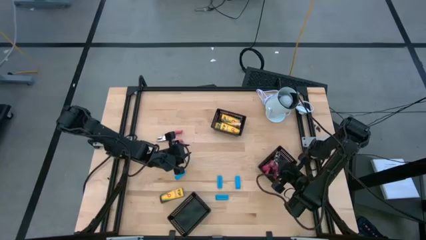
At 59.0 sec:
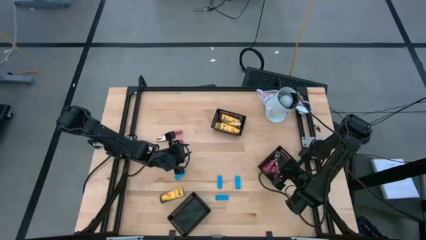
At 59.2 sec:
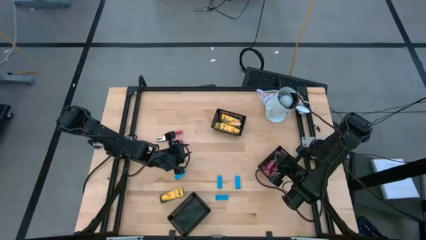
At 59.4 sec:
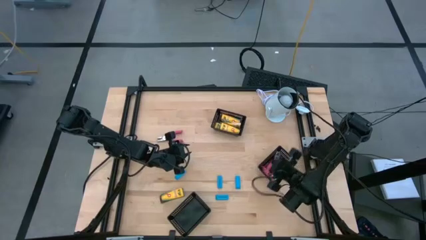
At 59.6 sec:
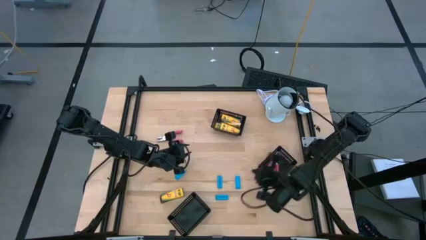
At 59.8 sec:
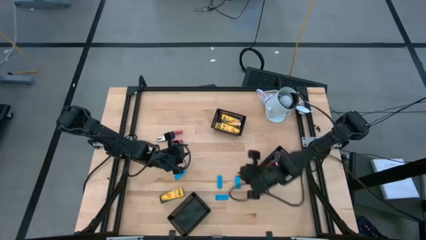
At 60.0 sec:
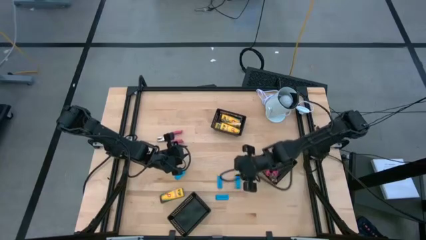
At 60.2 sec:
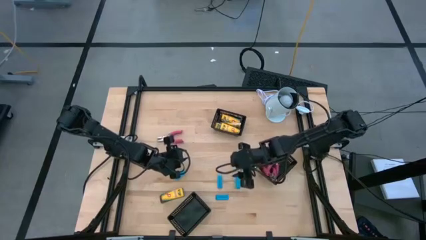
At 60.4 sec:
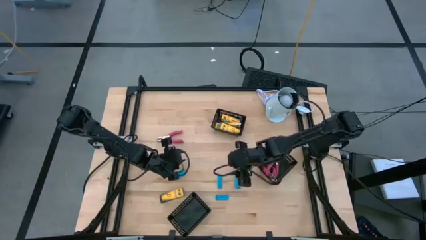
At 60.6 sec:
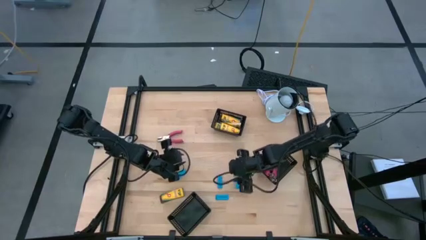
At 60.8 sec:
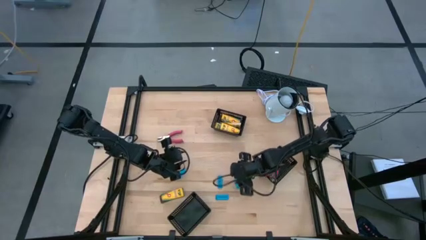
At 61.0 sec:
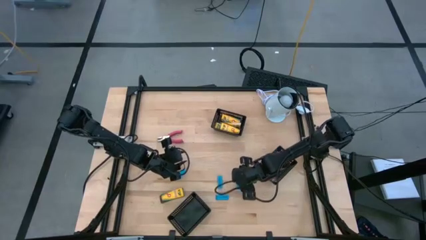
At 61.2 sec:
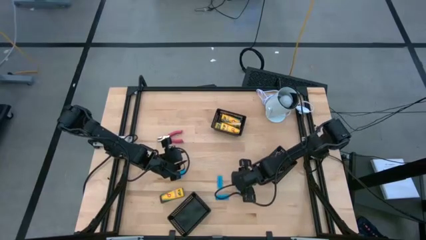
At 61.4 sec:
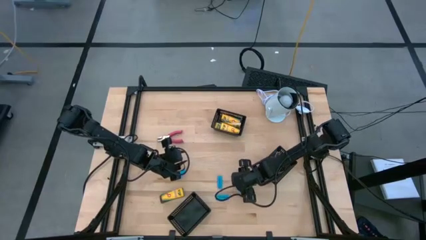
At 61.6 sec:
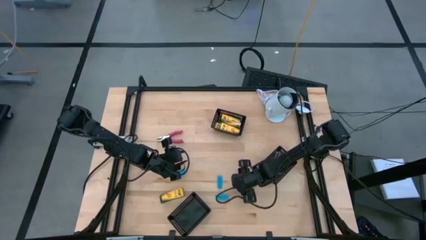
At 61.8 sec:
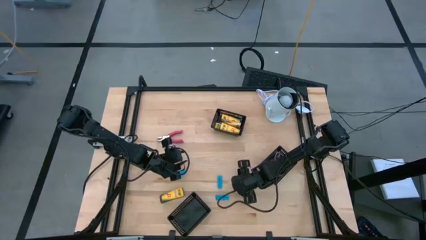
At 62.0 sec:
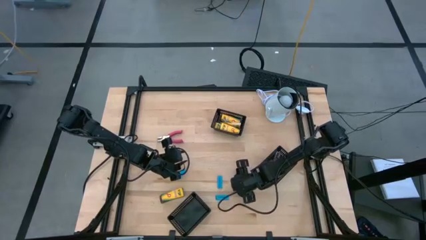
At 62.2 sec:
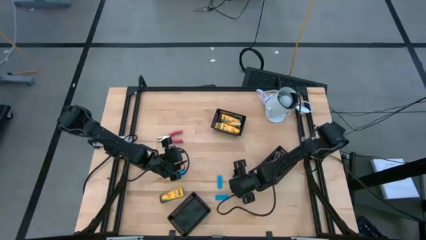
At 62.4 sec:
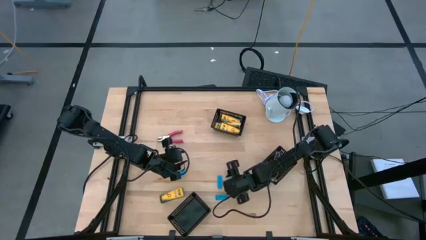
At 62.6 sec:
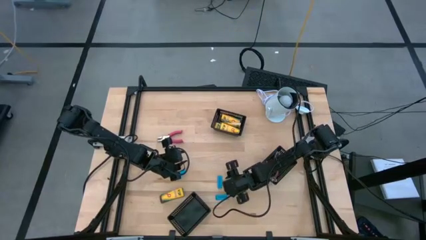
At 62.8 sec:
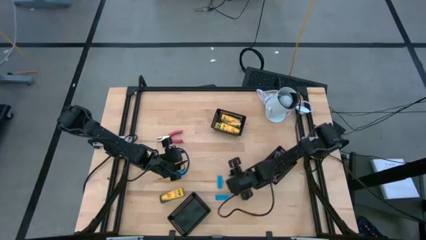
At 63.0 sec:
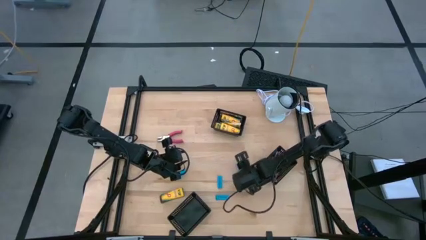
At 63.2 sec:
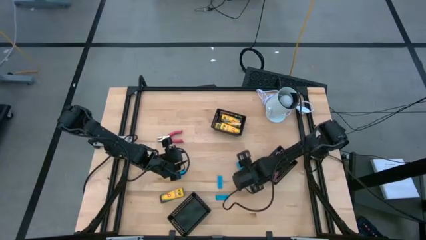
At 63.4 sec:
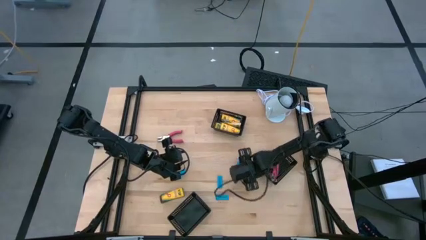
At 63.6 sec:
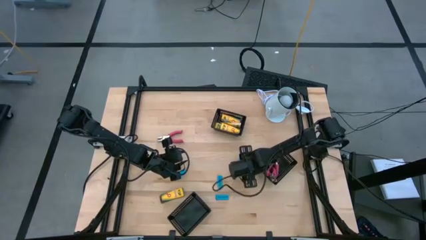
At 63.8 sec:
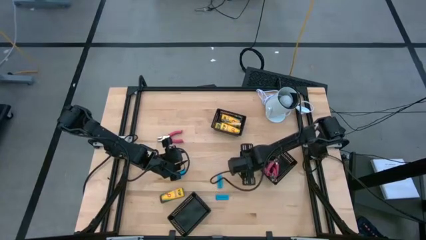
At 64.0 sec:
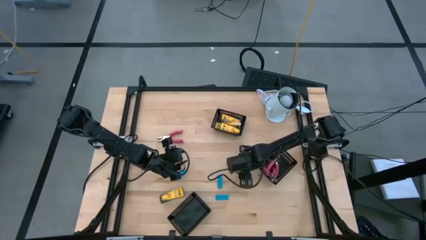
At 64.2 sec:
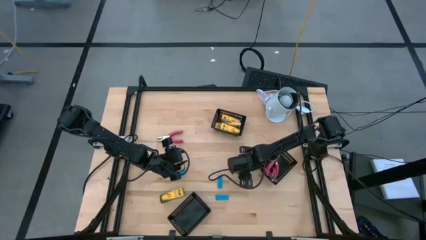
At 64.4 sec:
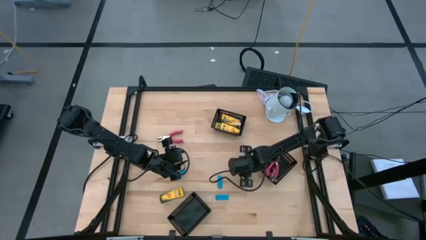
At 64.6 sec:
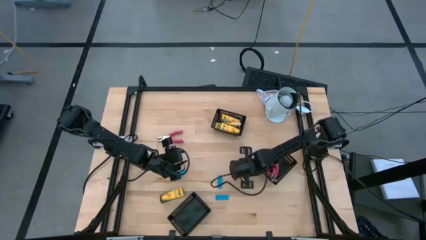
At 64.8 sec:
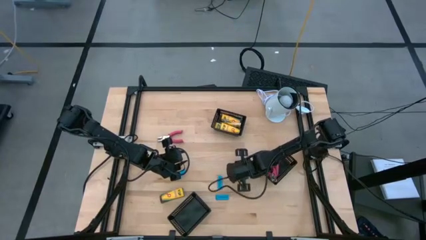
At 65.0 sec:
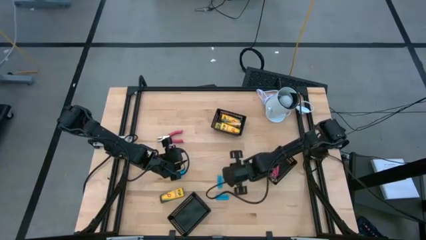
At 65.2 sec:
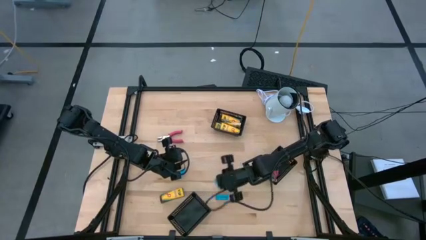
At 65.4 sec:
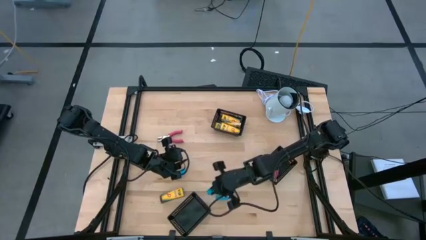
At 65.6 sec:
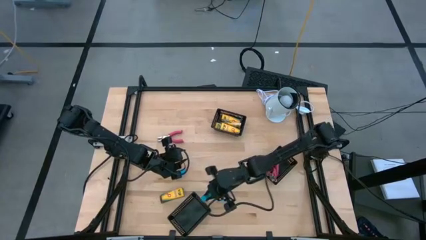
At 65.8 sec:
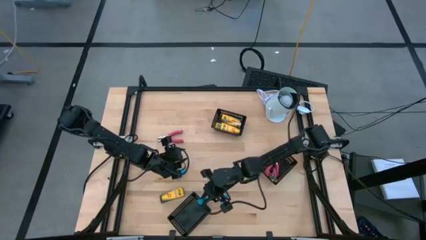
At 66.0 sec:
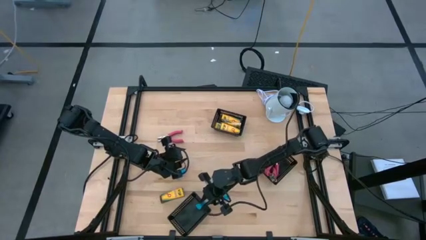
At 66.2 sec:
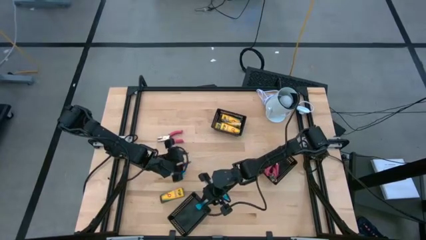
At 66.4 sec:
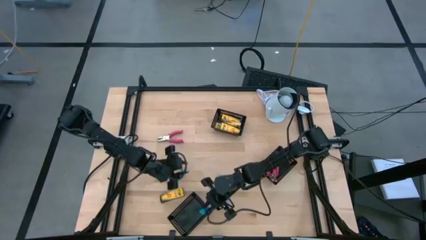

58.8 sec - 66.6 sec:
Task: Pick & Place School Supplies
Put the blue eraser into the bottom black bin

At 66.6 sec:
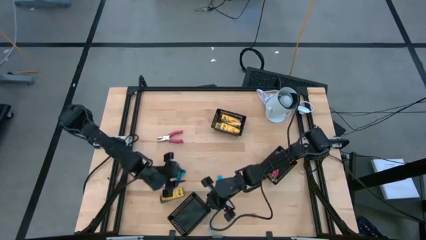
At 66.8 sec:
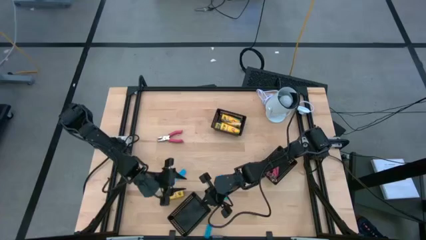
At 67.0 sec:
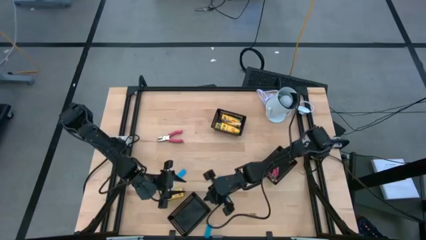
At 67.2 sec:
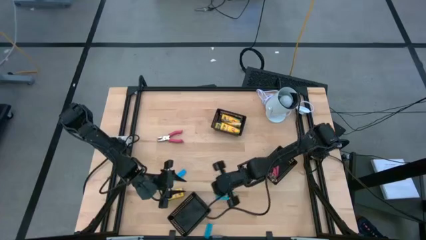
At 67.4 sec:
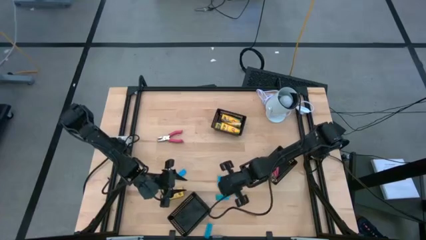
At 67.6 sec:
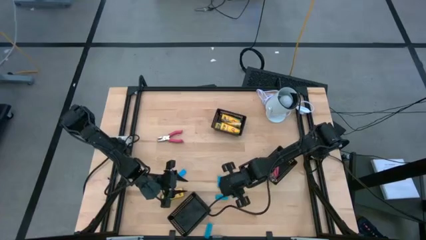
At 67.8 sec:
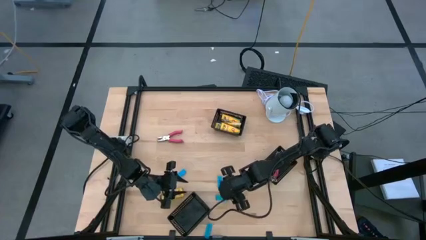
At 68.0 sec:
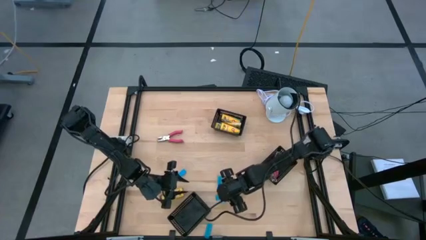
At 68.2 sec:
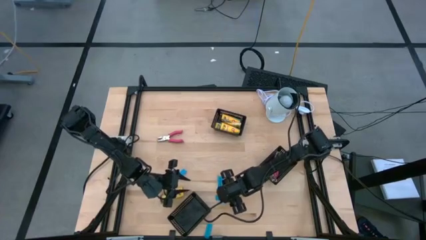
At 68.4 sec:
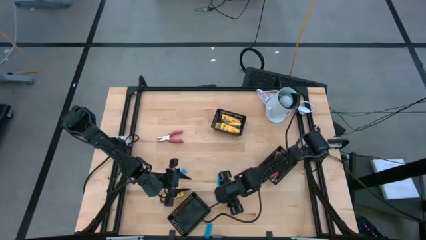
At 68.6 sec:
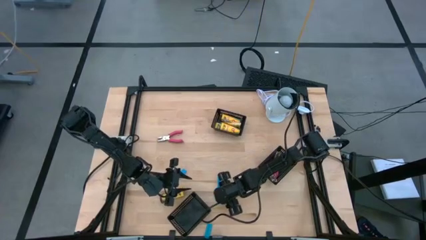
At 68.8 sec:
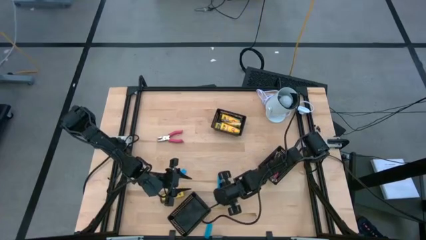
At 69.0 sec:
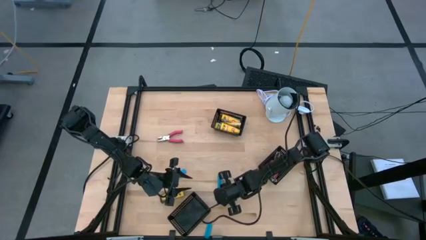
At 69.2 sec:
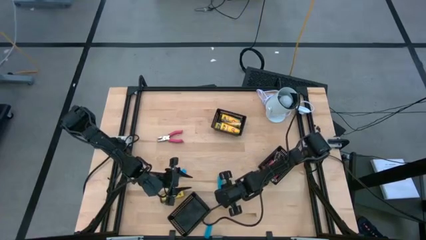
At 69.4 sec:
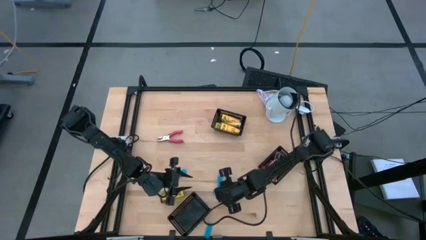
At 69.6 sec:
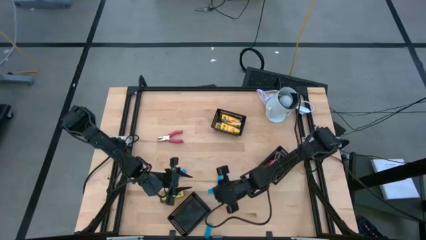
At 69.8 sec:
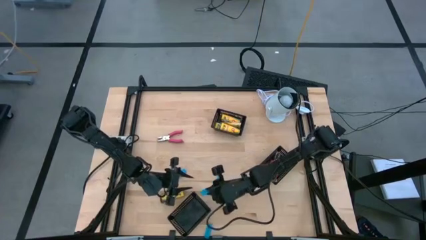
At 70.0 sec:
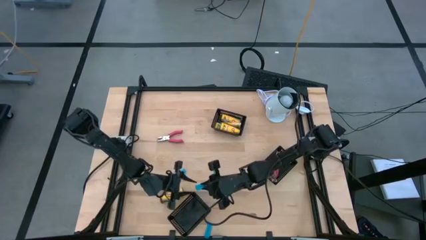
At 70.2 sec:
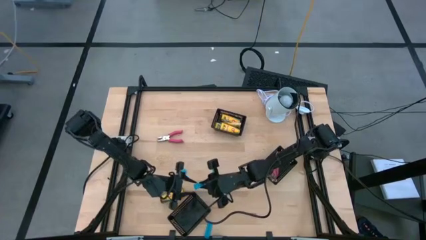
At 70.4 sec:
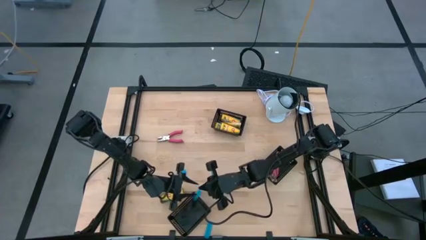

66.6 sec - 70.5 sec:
Put the blue eraser into the bottom black bin

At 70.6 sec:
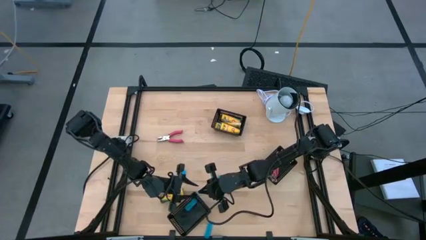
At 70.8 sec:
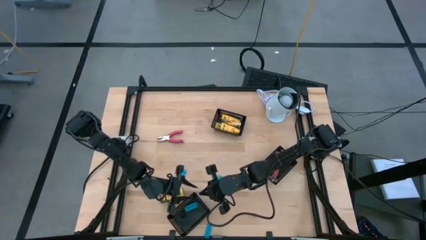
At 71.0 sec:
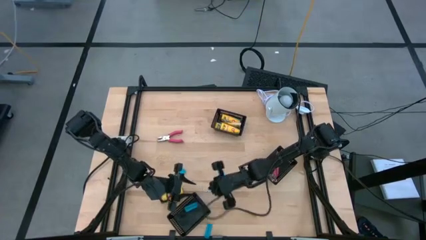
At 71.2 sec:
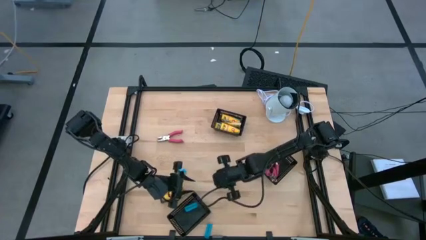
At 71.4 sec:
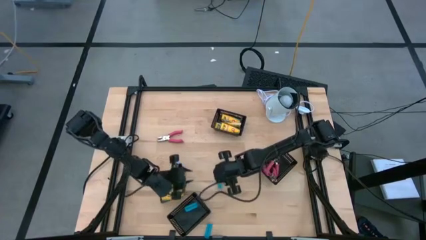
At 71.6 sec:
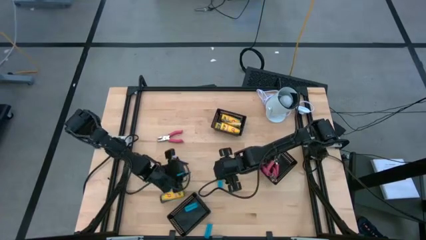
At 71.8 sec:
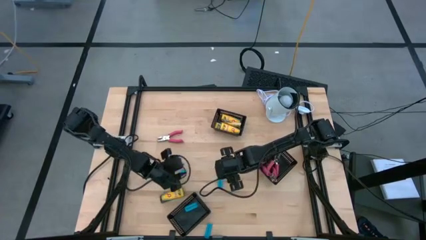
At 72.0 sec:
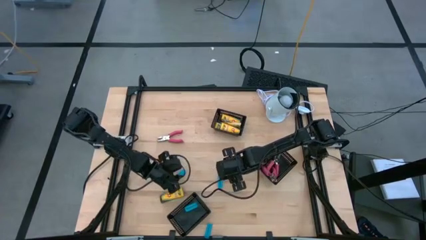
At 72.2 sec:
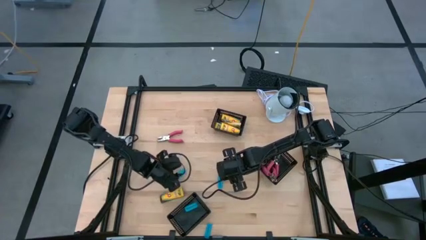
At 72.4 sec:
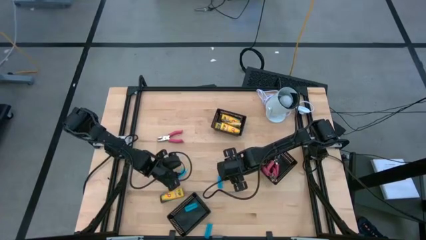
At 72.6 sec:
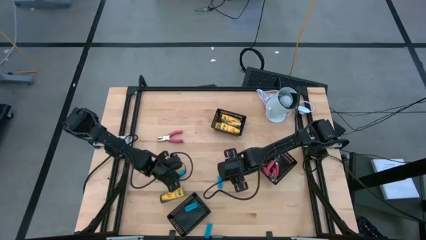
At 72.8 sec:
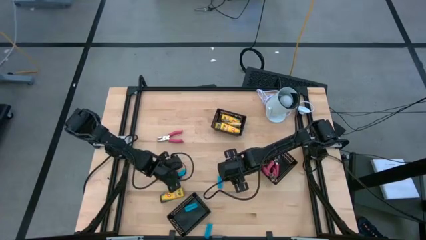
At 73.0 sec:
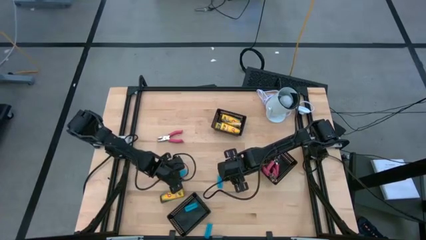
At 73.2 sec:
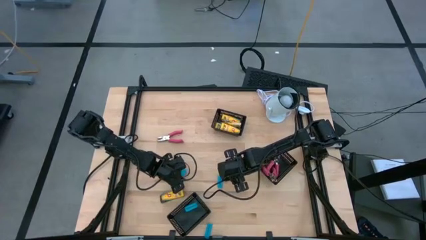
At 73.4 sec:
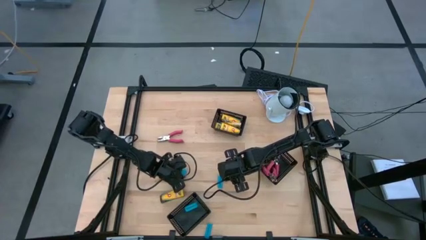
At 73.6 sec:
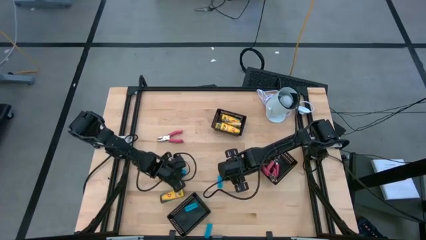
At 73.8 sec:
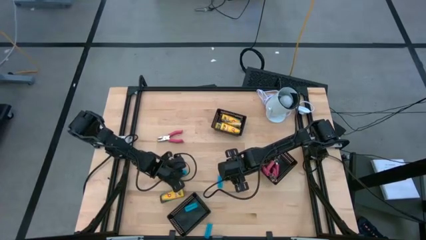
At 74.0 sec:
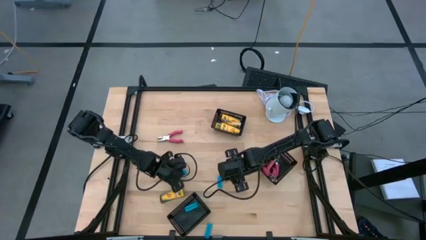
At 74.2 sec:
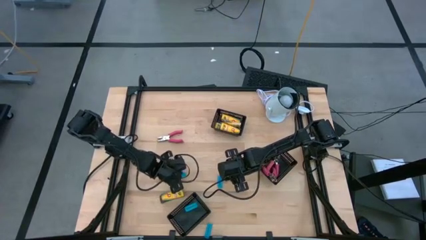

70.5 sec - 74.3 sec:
Put the blue eraser into the bottom black bin

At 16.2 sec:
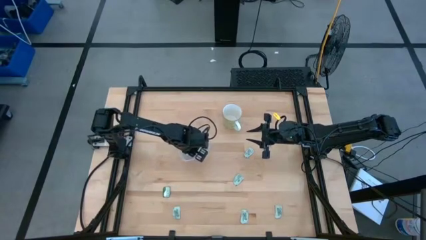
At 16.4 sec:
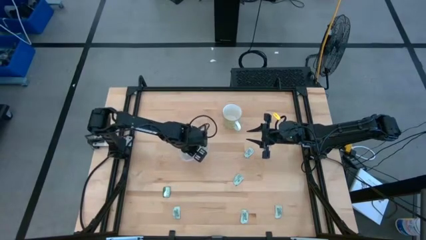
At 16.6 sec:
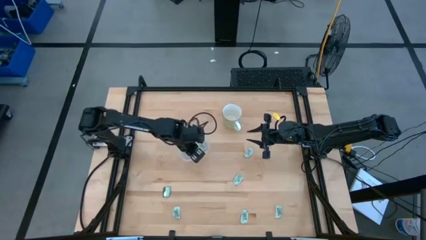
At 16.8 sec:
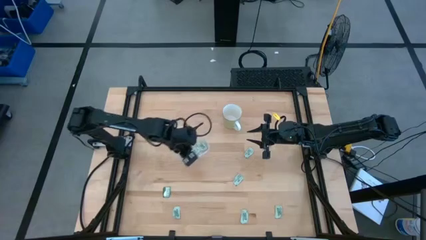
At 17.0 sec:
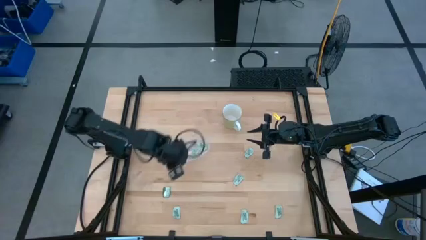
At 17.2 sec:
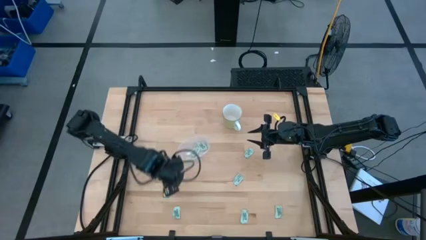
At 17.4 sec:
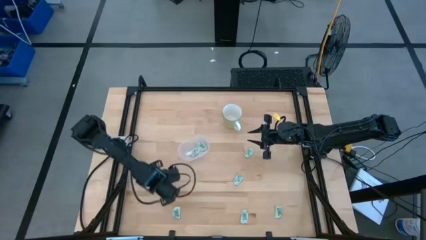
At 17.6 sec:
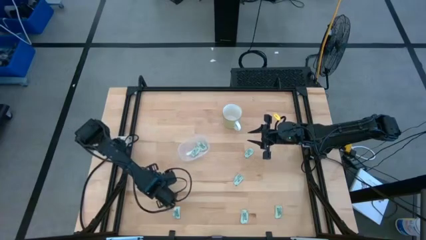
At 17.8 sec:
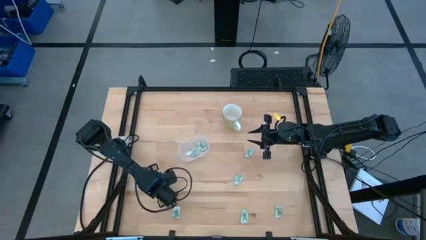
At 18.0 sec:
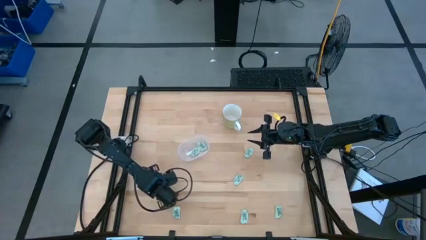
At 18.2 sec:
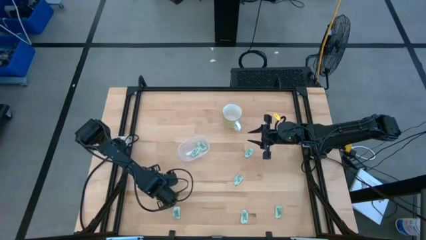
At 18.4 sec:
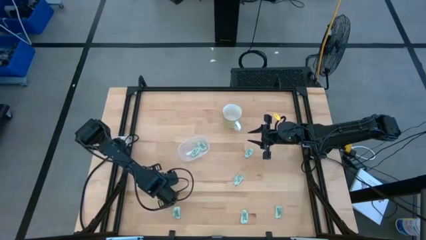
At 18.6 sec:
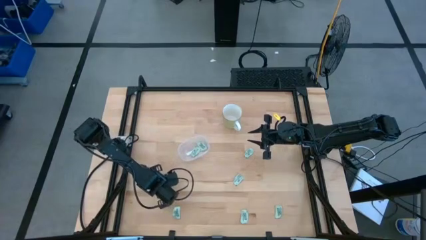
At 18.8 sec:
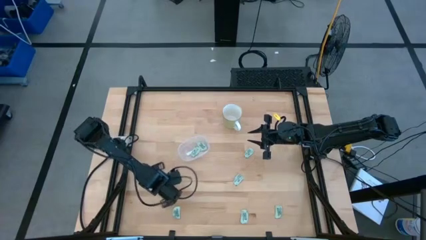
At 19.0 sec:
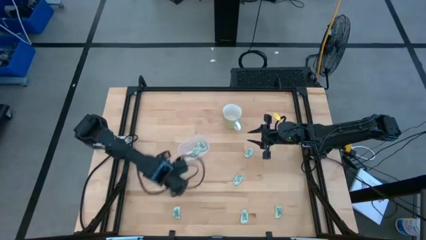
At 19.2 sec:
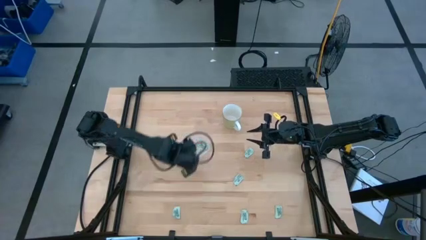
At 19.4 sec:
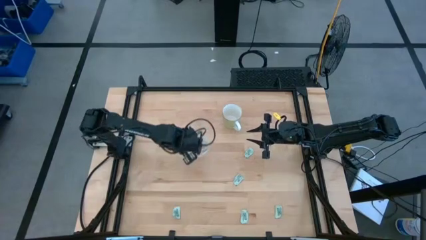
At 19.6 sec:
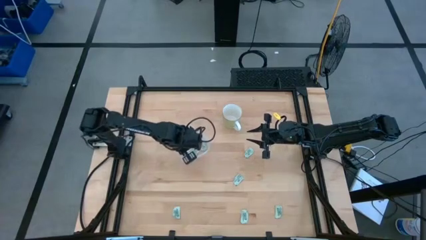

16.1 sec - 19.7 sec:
Task: Pick and place Stevia / Truvia into bins
Put the green stevia packet into the bin
